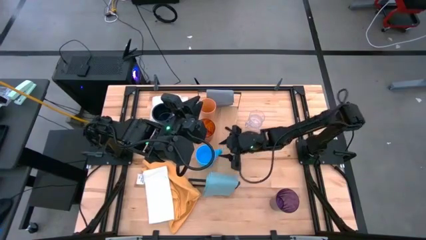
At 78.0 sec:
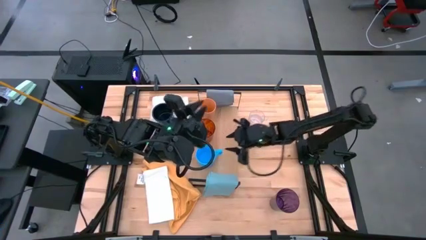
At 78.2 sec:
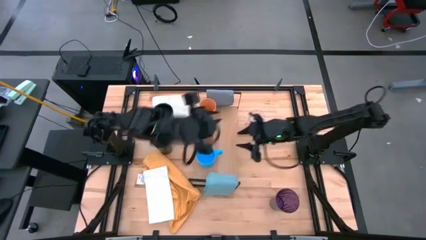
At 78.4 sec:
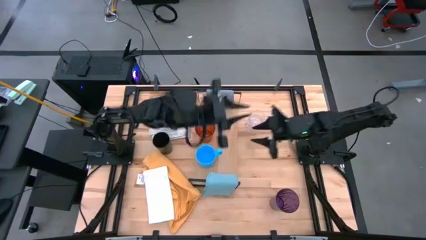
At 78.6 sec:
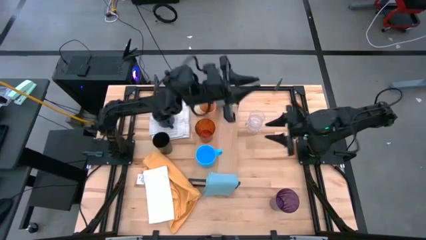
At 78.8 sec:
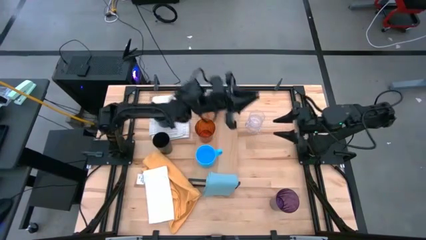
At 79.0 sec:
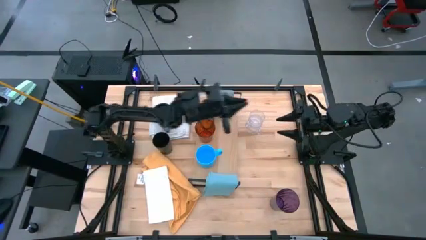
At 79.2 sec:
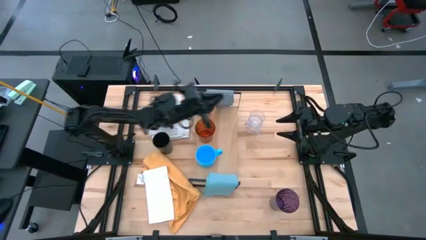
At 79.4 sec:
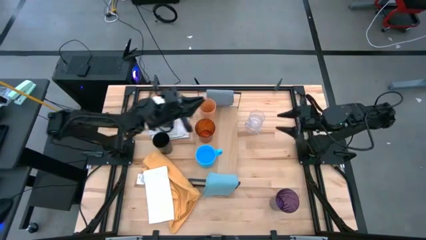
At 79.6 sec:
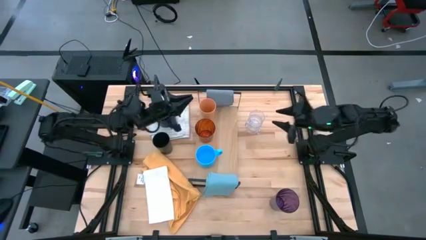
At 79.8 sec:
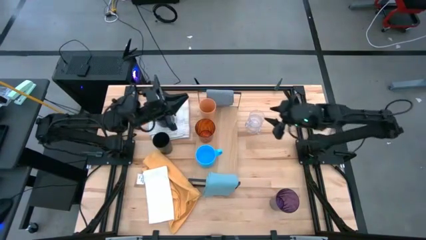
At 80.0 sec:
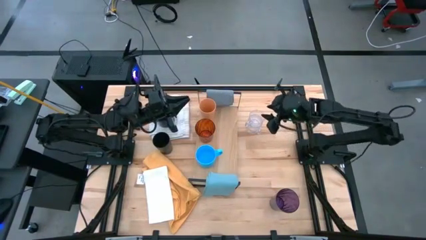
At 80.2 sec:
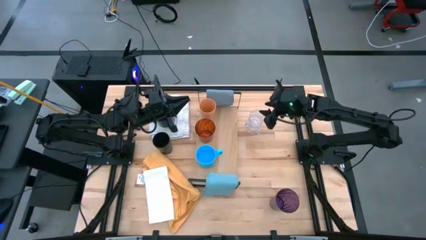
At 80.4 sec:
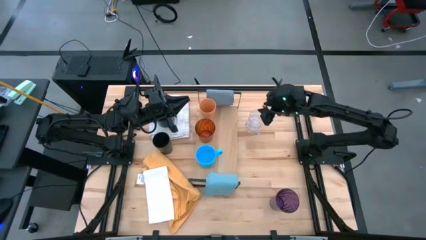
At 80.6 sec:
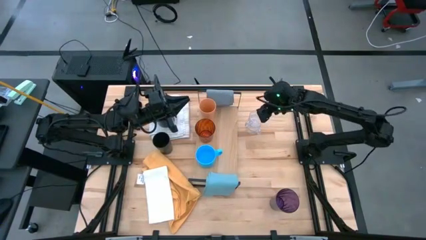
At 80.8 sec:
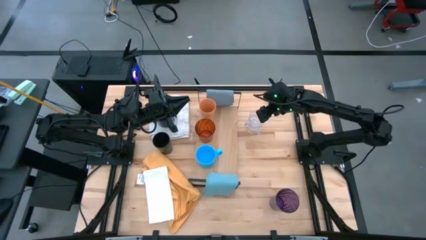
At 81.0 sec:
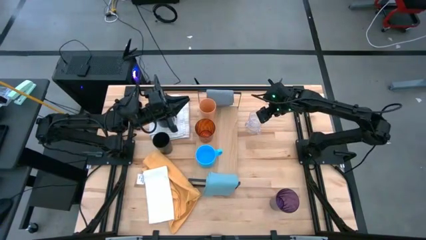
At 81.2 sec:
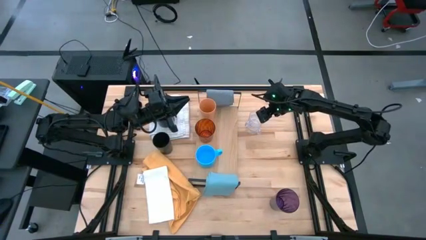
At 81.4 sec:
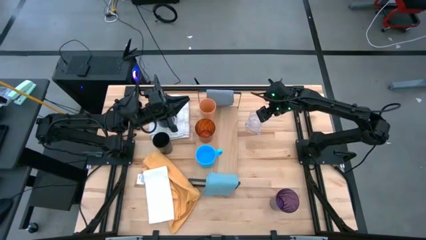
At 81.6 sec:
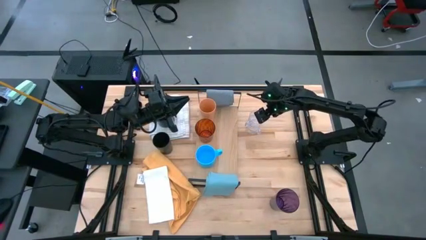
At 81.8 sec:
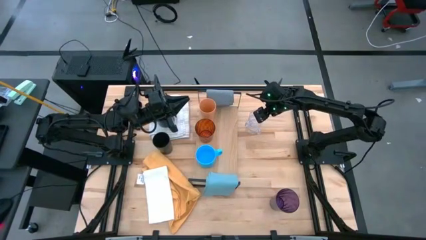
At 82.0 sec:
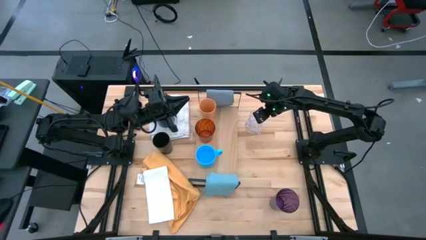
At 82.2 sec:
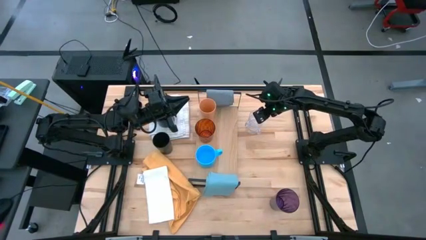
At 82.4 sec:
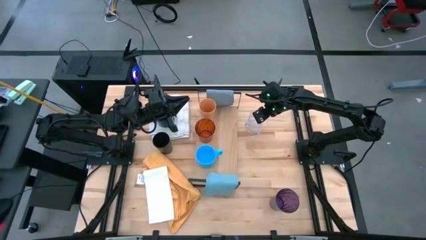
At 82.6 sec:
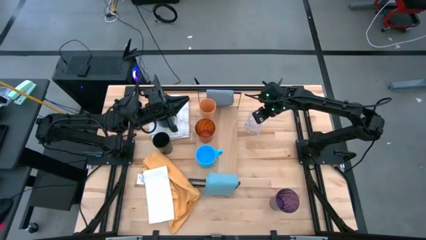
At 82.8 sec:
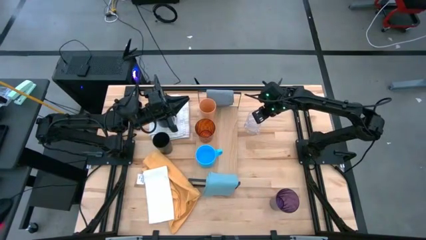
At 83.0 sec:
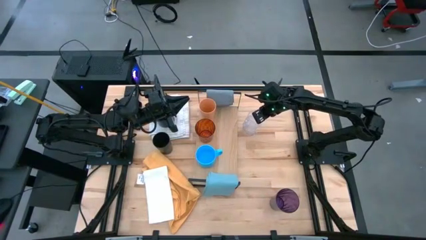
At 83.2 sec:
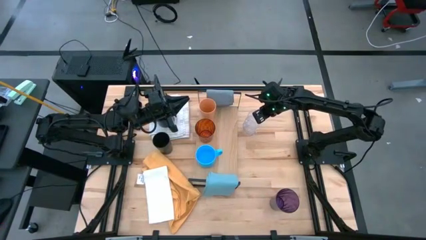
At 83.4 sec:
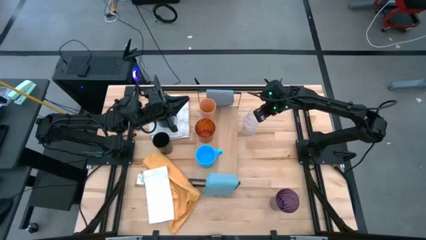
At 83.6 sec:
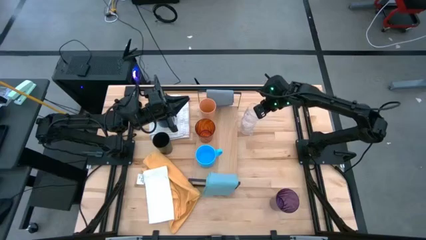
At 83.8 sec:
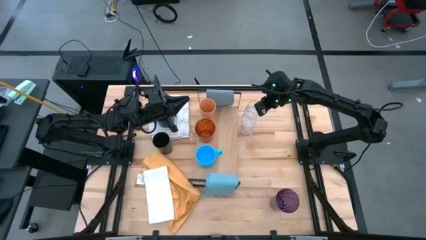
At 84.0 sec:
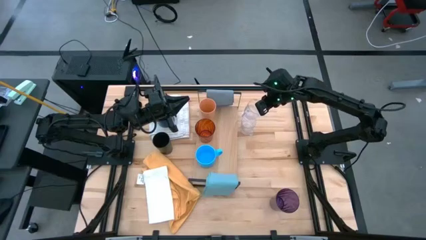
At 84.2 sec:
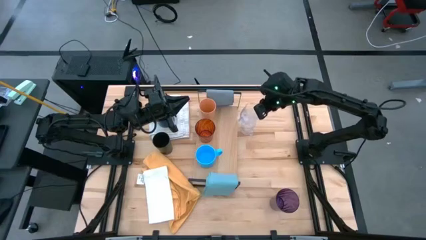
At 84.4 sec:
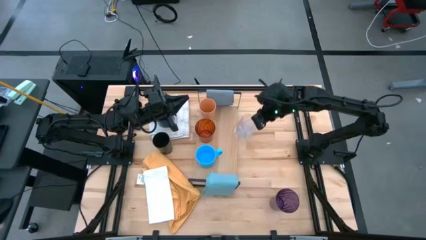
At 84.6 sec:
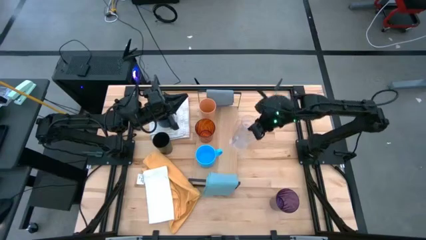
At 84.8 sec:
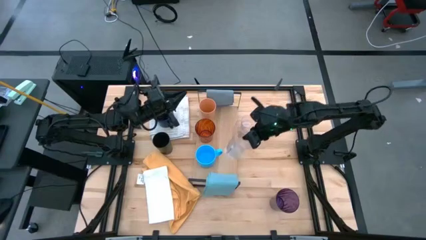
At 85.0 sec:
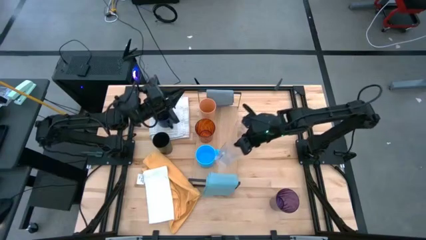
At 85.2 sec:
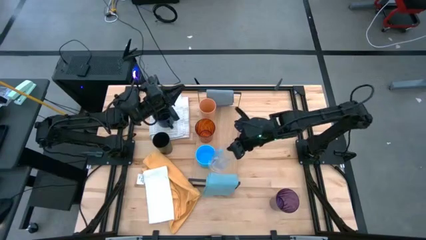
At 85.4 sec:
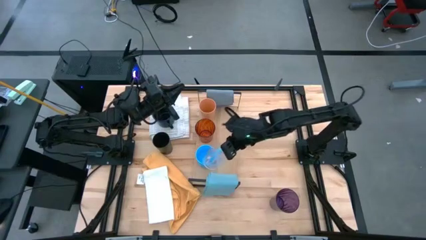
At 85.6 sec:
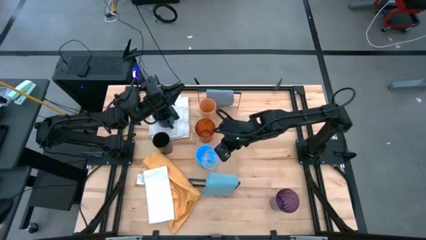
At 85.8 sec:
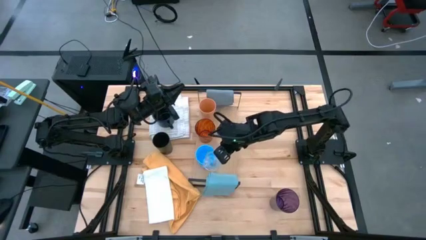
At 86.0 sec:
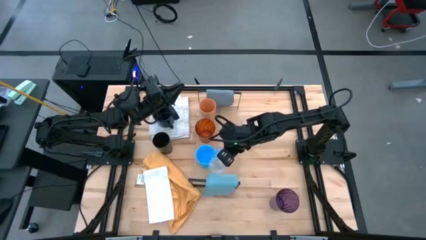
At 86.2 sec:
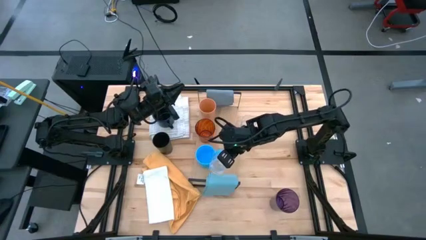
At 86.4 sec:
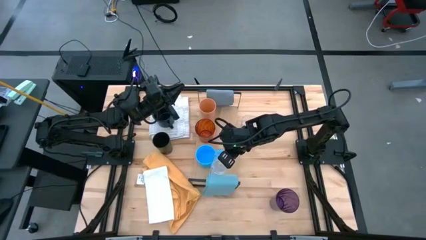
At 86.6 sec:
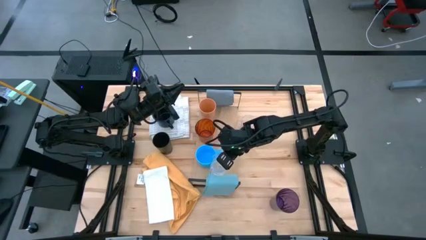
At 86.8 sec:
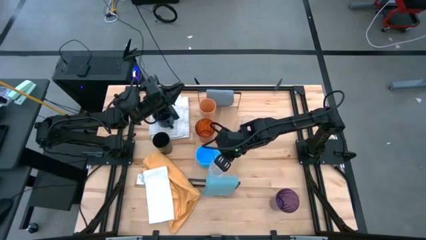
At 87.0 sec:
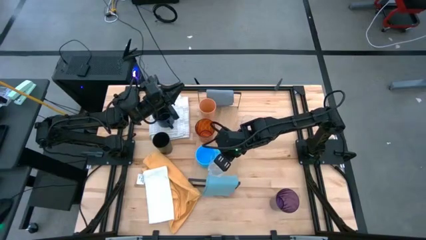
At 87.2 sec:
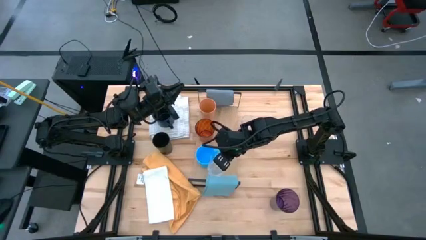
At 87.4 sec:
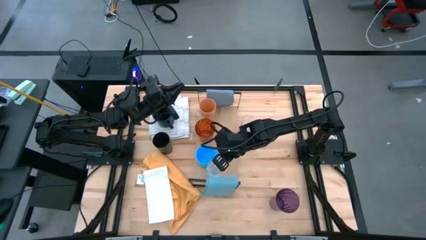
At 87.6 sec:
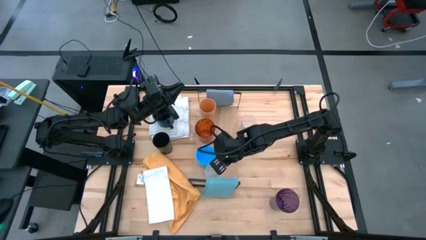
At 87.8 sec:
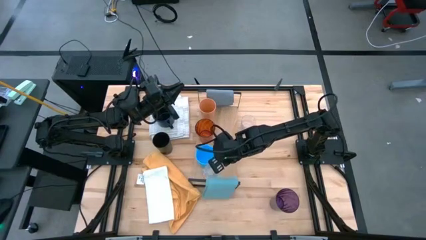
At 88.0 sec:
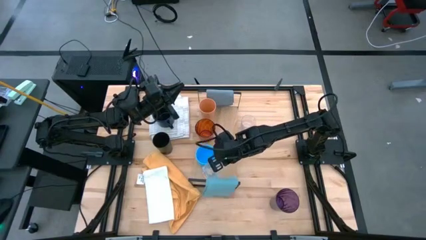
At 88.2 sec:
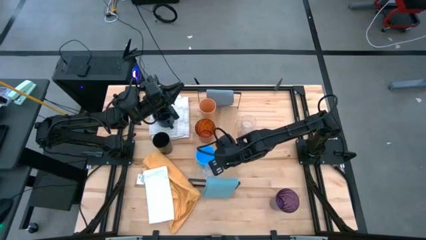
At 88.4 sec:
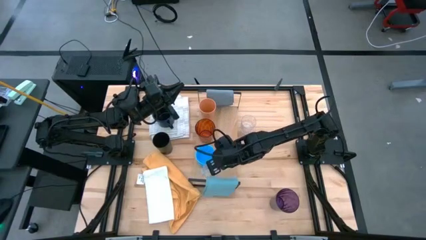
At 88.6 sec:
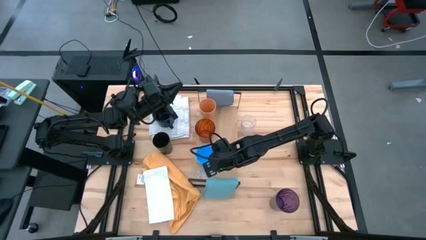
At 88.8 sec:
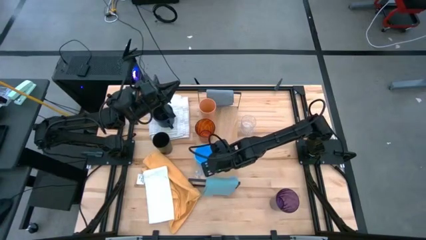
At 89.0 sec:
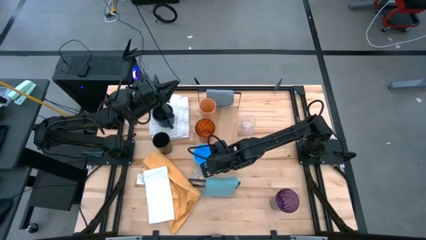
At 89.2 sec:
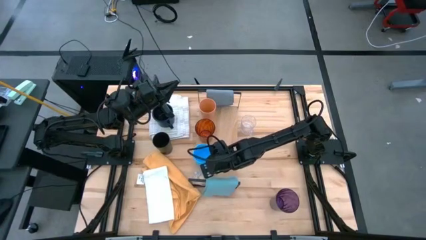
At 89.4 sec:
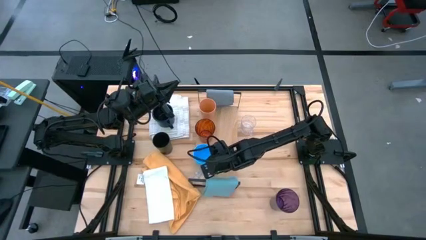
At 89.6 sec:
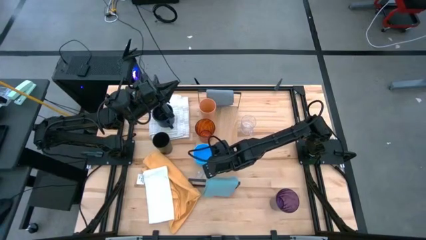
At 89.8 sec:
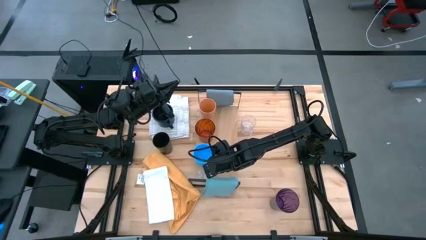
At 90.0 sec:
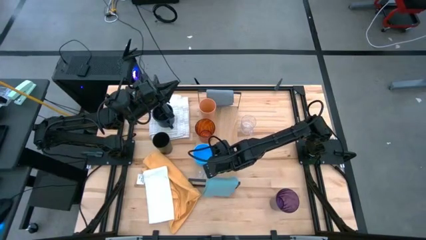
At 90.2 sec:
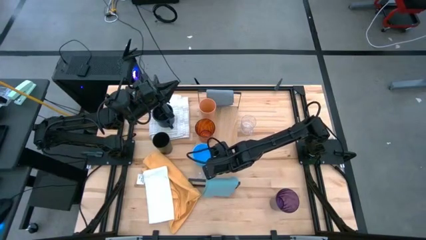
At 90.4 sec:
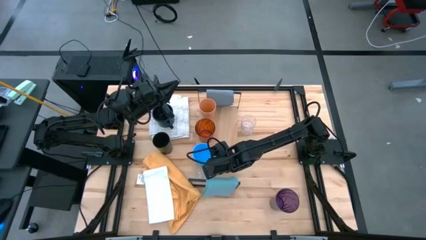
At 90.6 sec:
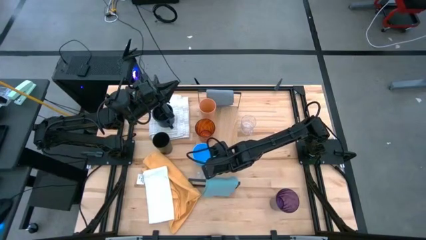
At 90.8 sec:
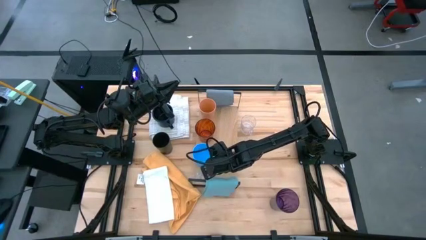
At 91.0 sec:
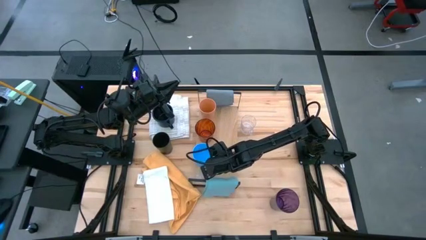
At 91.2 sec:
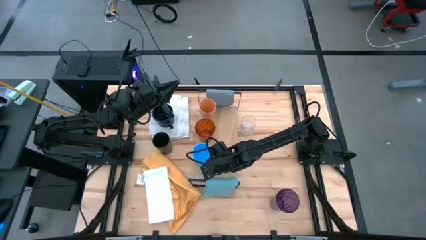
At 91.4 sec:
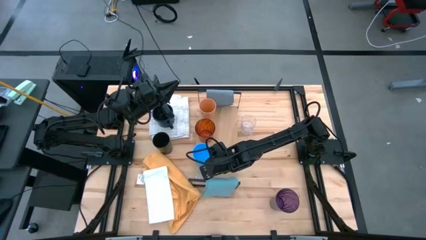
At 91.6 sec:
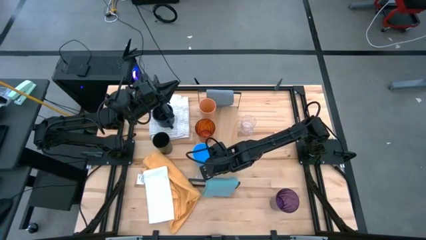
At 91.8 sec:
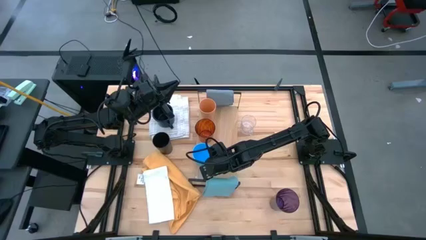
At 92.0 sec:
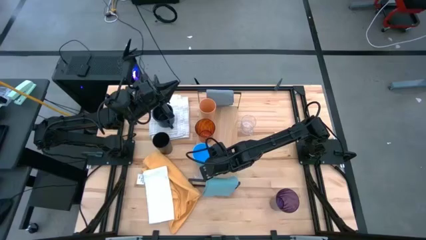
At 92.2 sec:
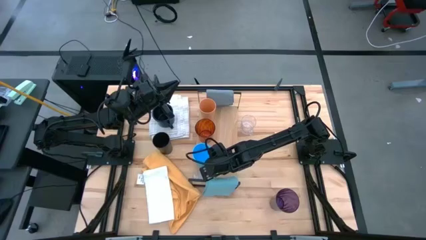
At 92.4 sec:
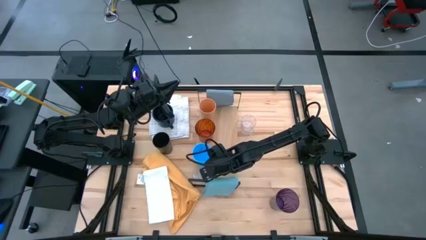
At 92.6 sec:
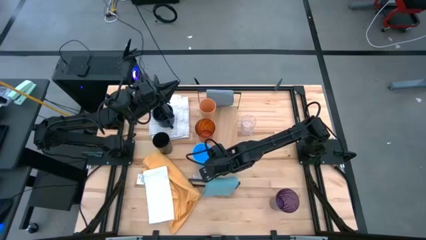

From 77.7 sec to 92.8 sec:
Task: Stack small to large cups/mugs on shelf
Put the transparent mug on the shelf

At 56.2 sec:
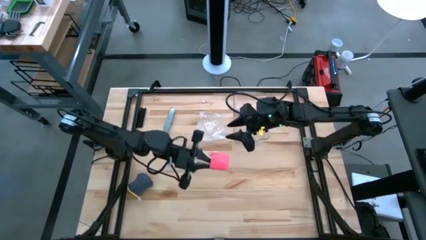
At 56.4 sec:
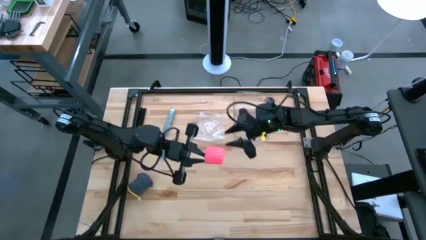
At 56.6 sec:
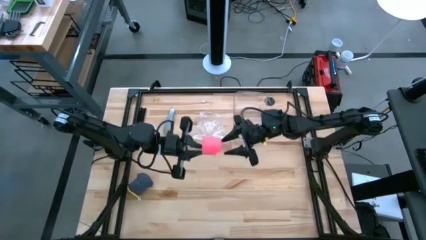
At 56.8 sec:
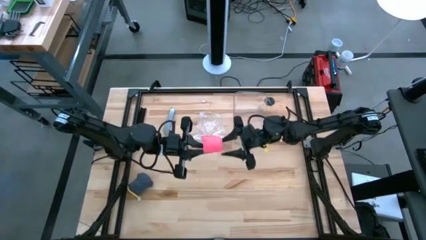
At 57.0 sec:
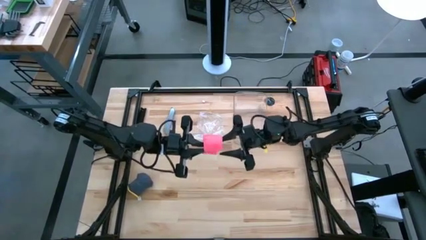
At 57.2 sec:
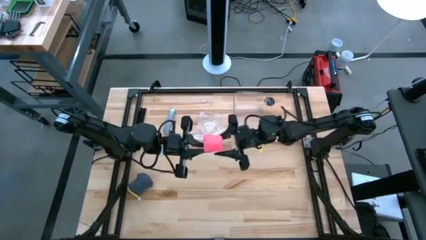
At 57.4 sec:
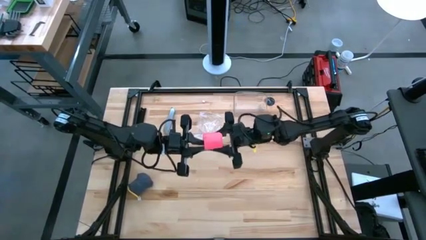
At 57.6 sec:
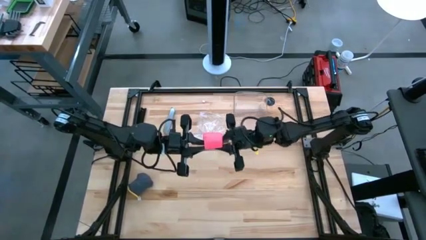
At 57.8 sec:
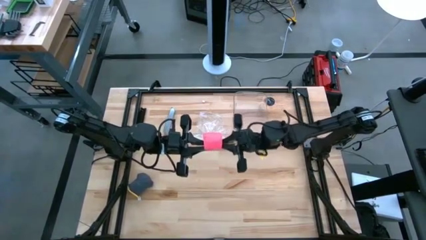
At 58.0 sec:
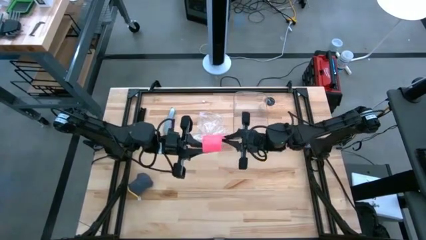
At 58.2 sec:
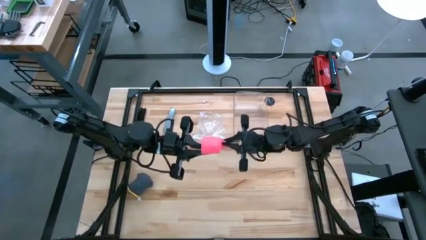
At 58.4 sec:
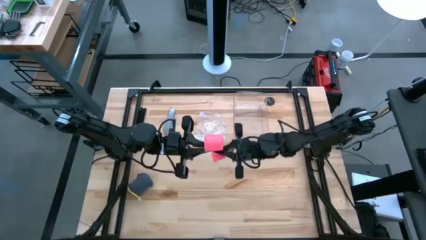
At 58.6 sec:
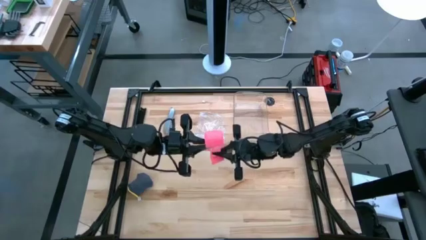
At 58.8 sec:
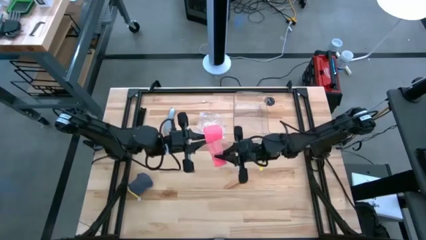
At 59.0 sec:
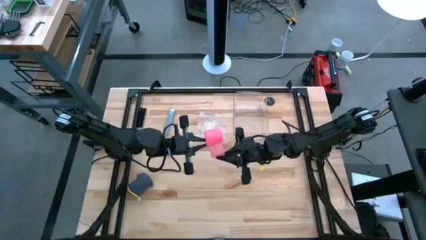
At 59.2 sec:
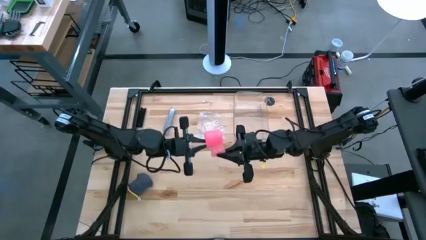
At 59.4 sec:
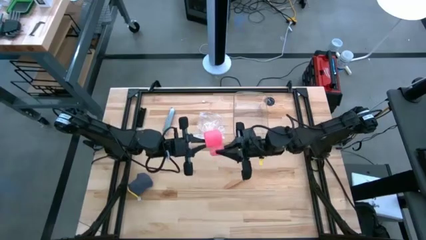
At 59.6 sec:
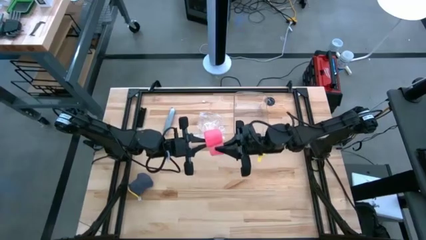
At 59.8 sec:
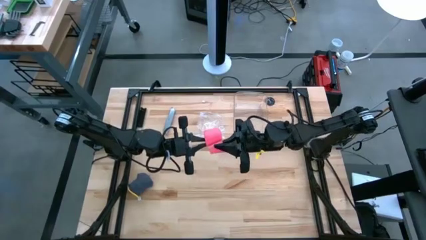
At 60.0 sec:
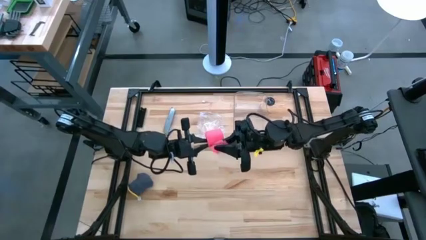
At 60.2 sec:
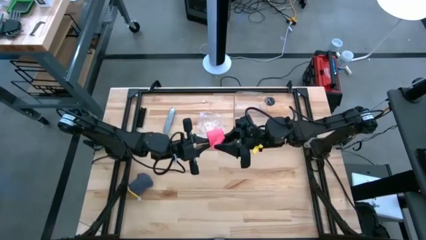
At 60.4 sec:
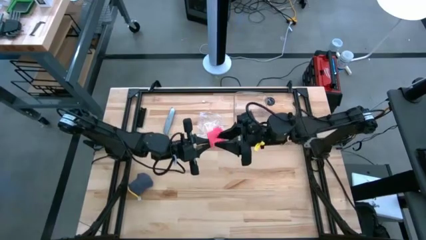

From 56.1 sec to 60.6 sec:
Task: Roll bandage
Roll the pink bandage
